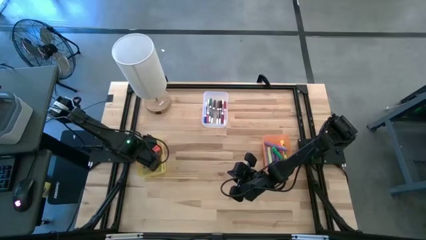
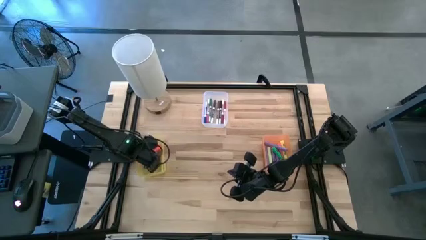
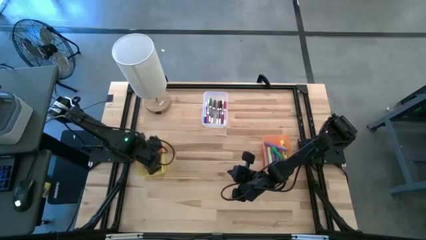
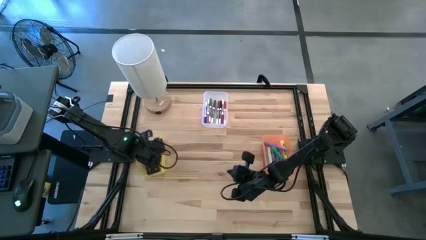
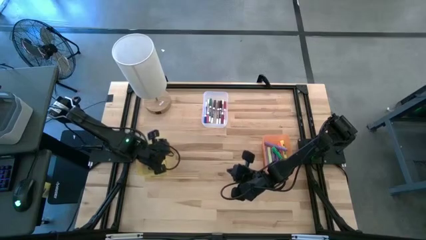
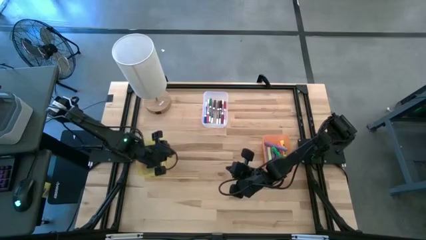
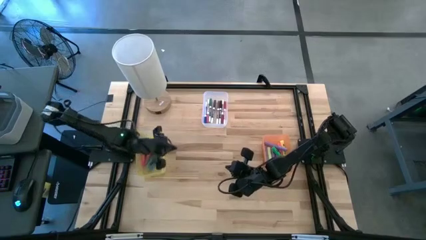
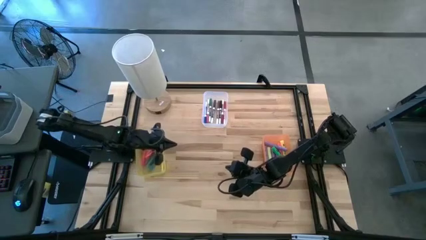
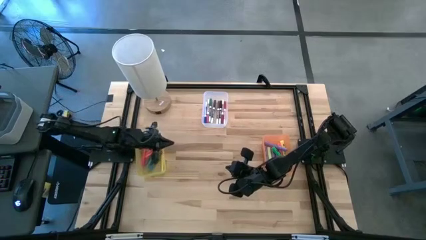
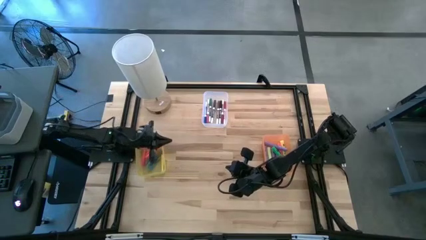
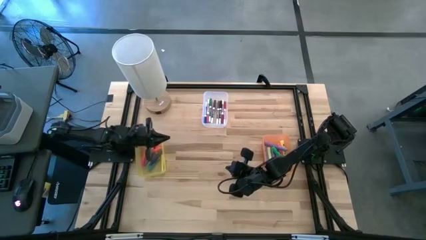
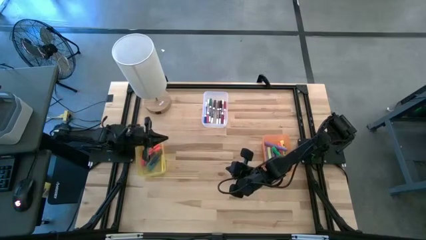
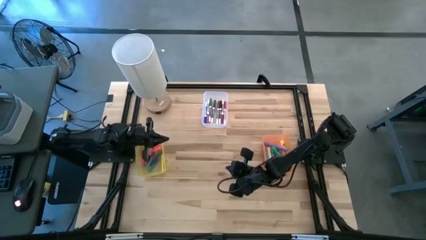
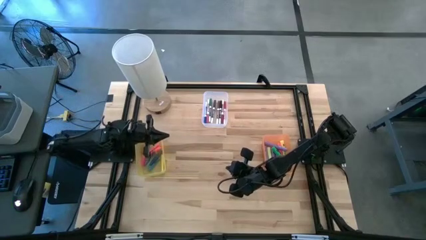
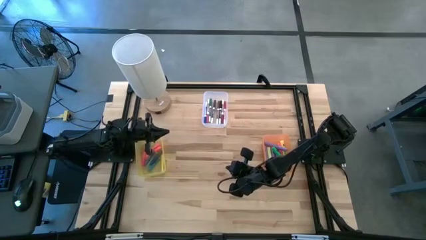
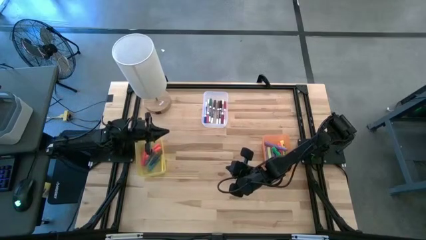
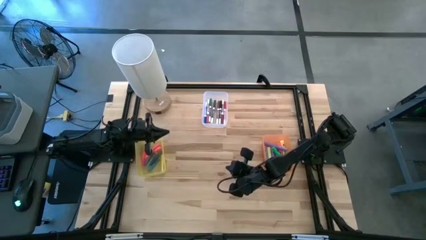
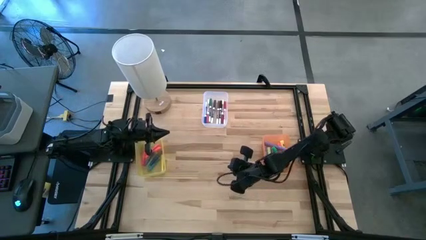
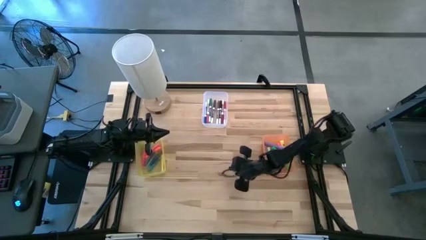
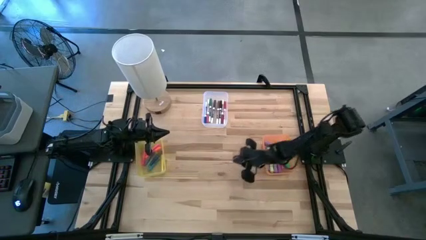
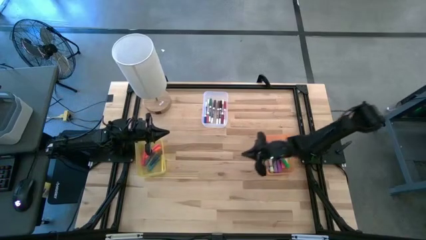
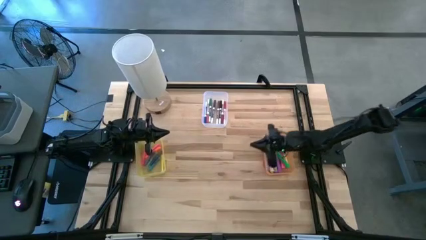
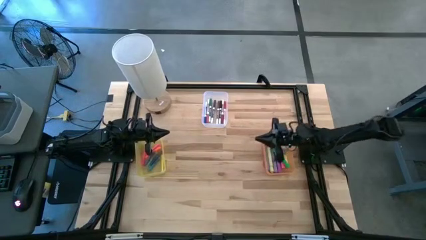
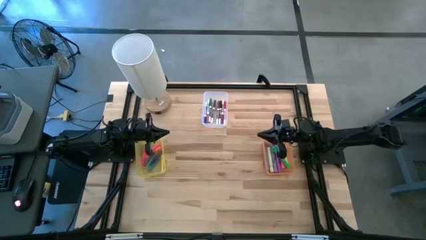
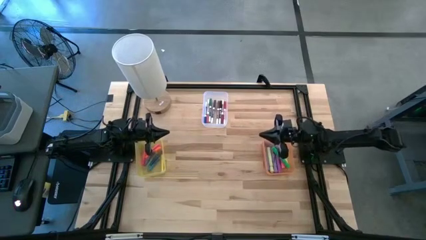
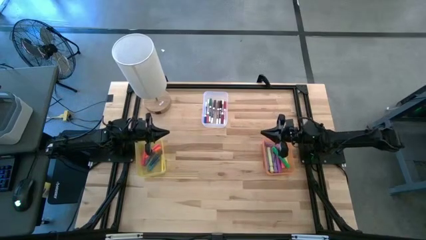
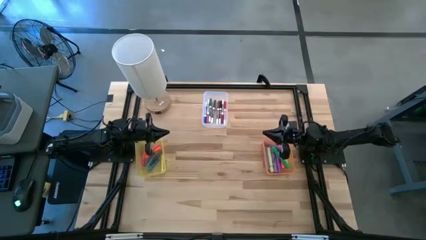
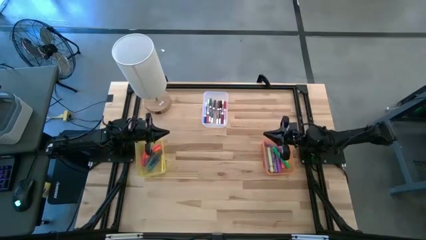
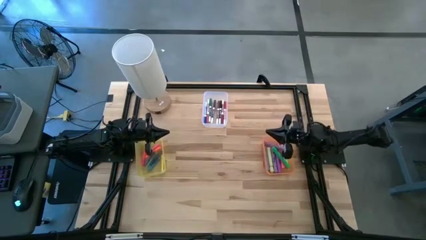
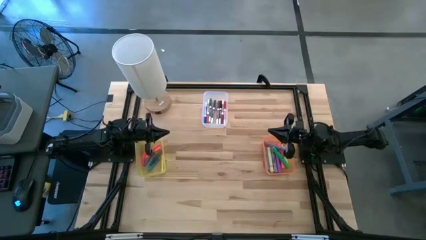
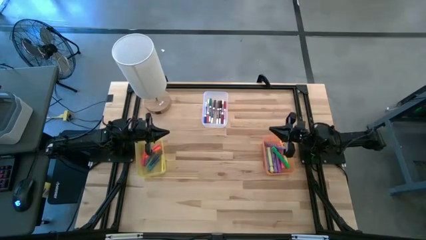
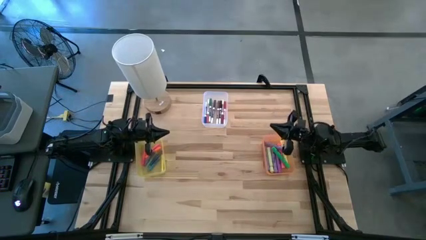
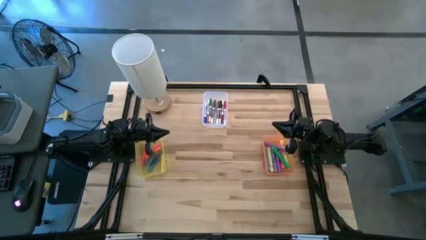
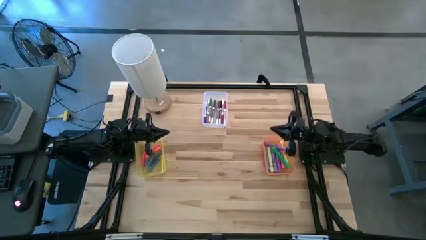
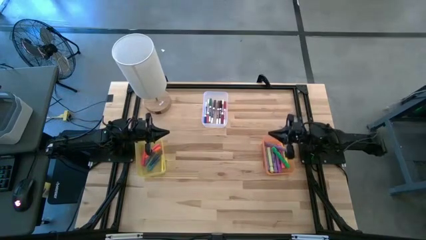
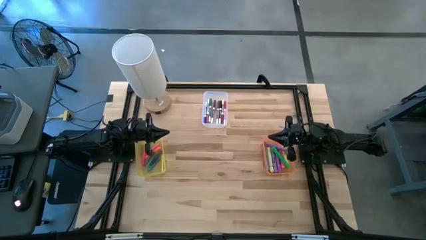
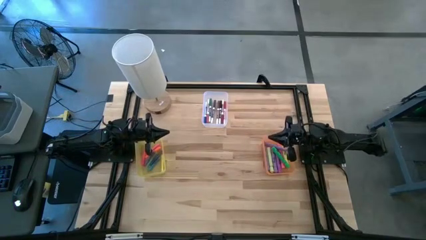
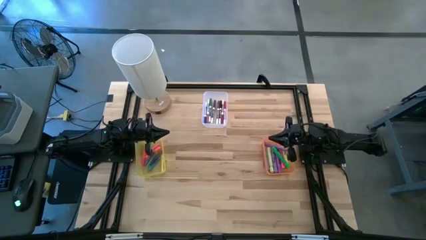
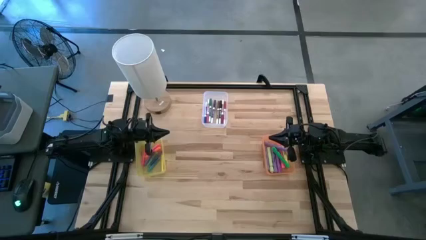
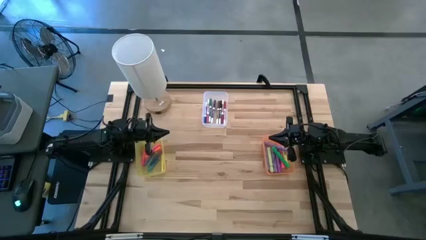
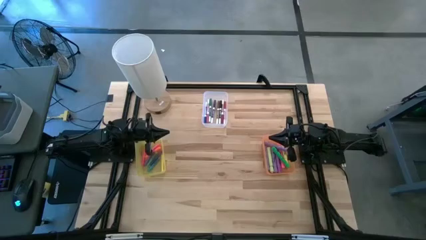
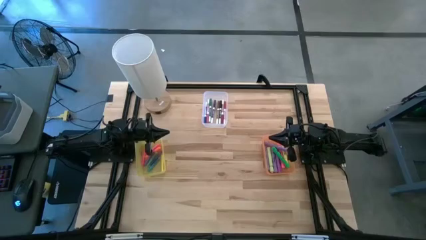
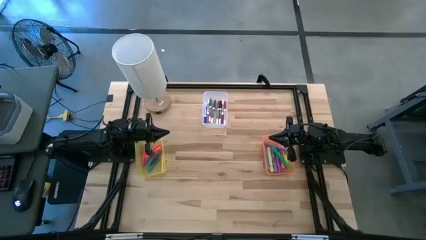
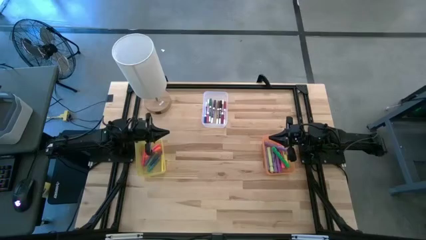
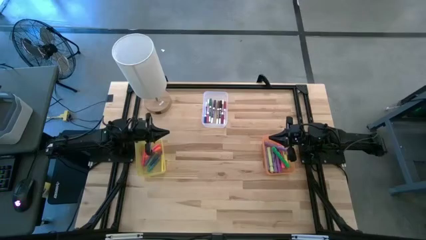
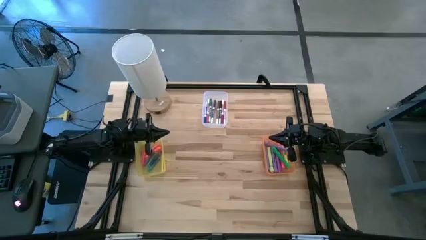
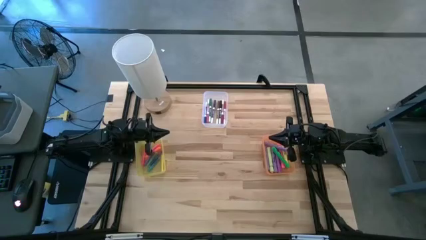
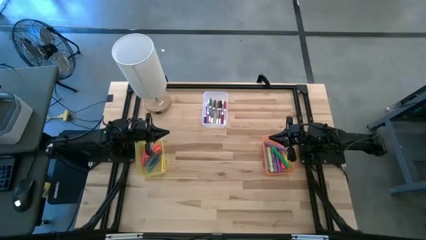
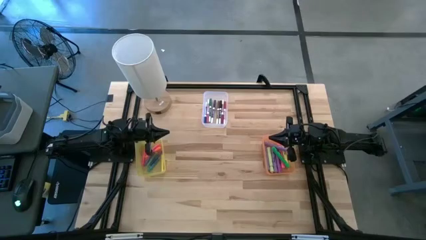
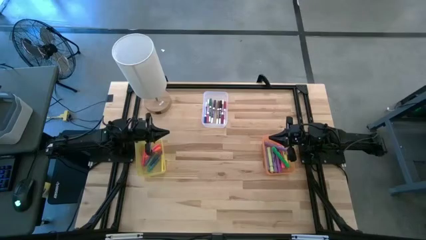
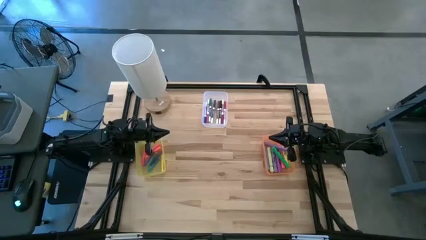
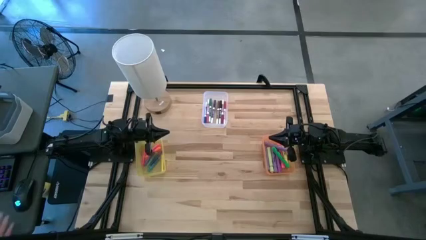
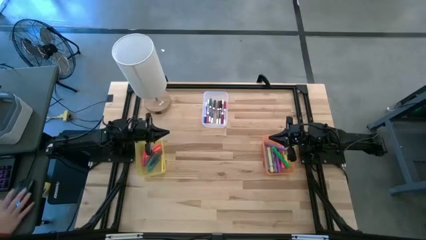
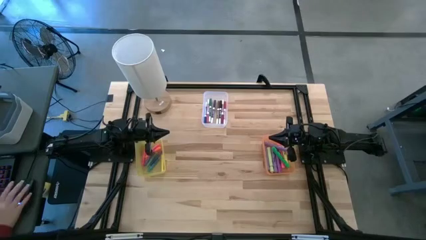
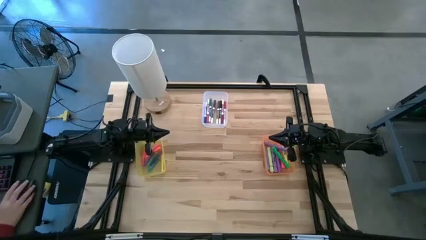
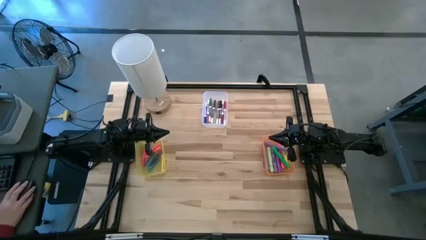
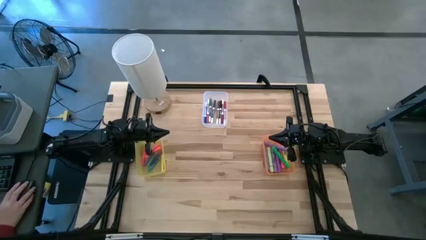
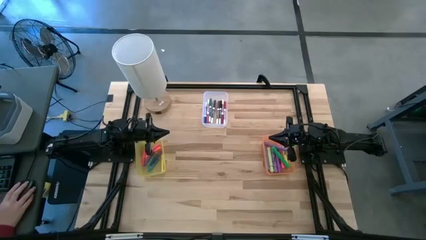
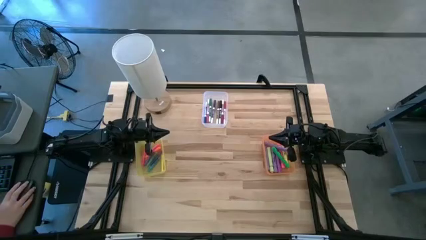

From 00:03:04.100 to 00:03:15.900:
Task: Pick & Place Markers
Return to Home Position

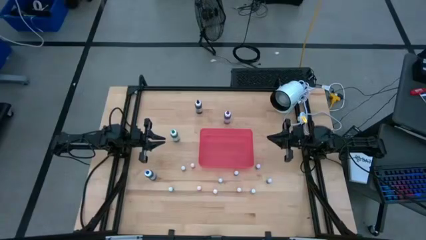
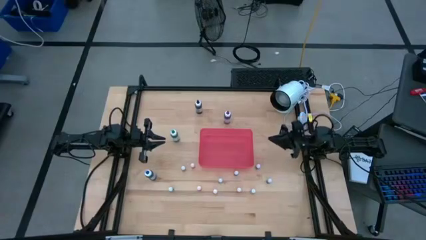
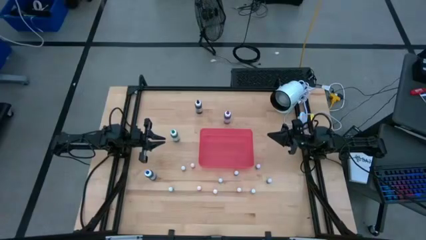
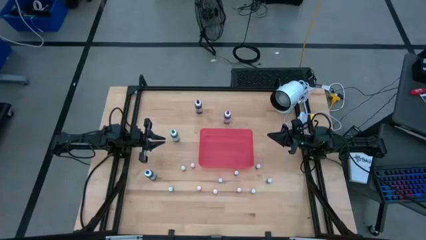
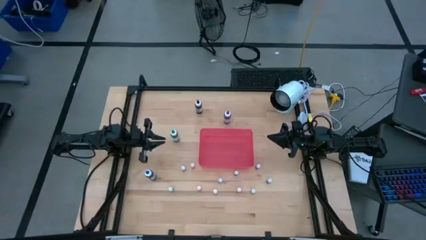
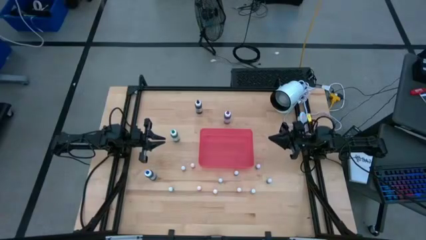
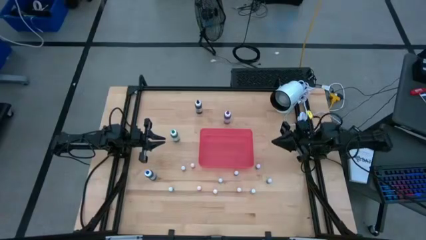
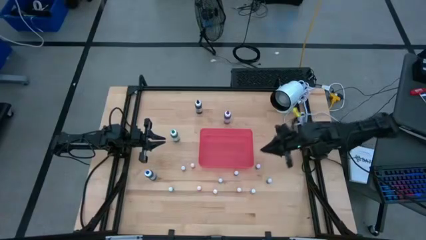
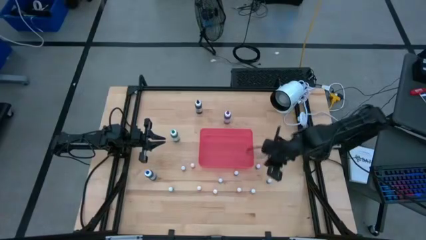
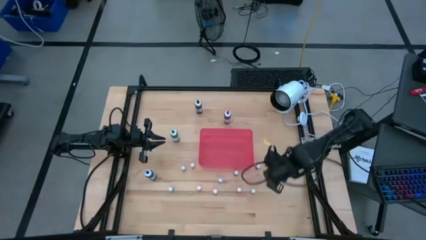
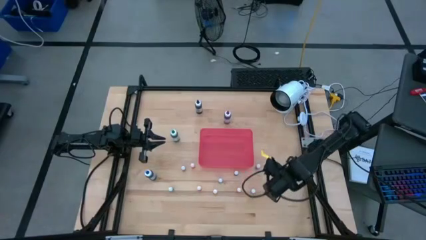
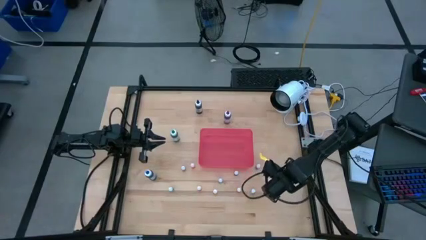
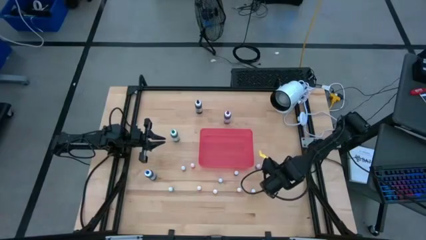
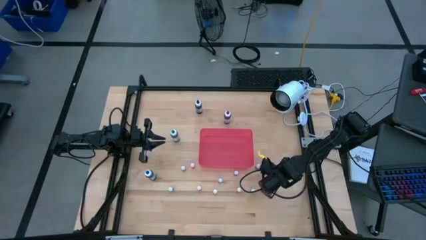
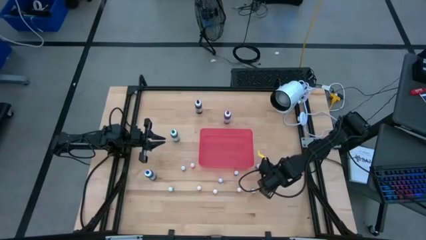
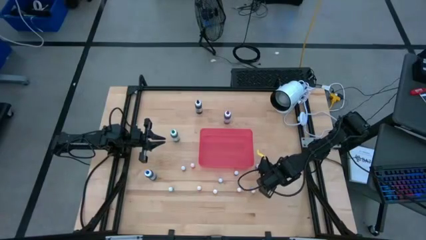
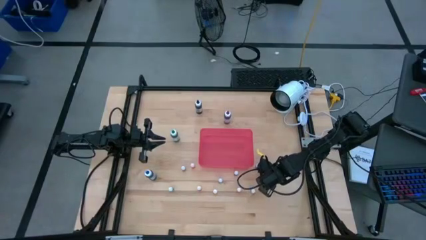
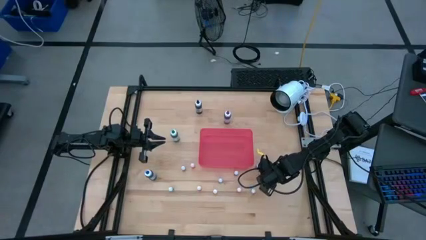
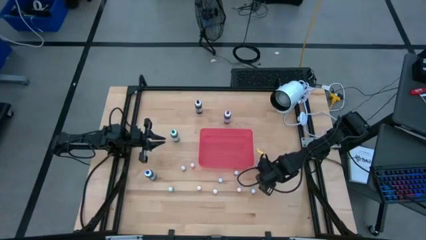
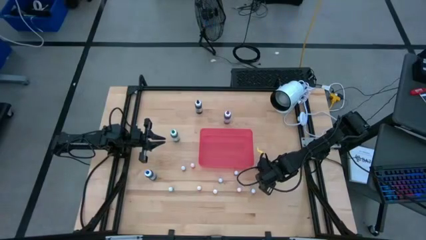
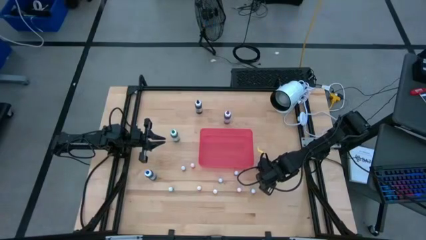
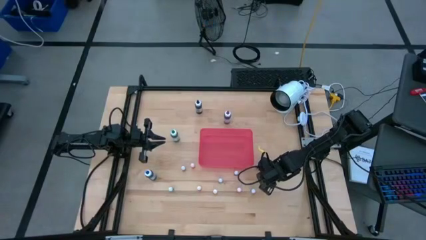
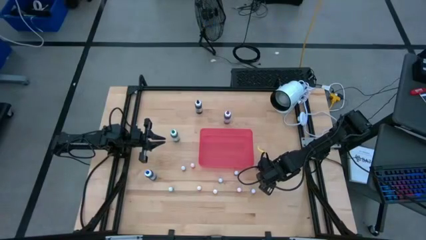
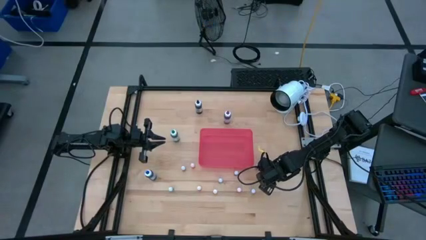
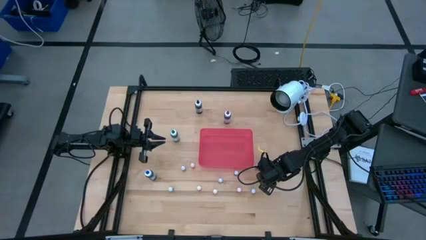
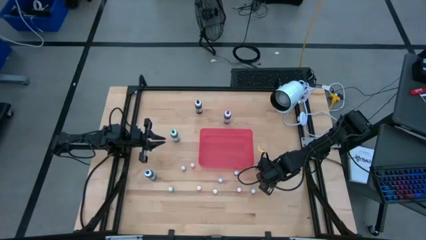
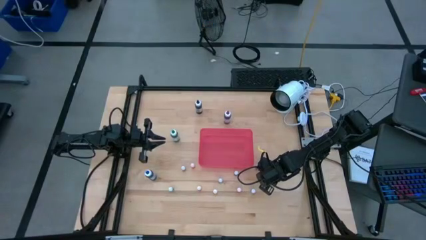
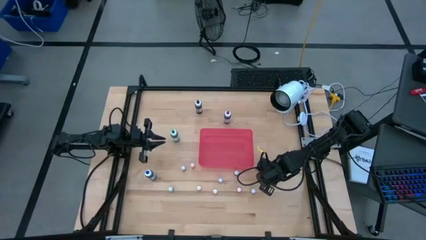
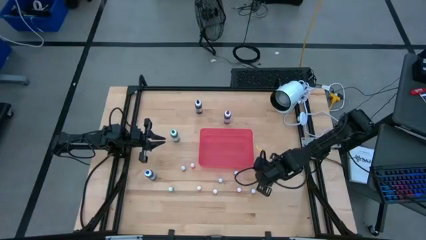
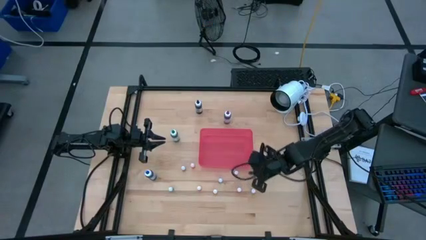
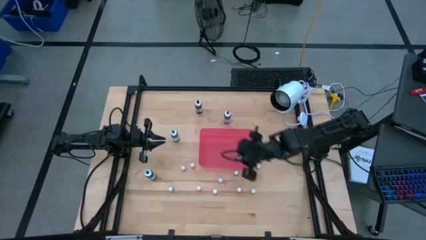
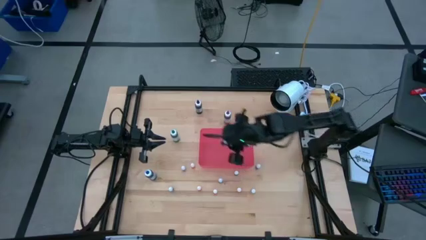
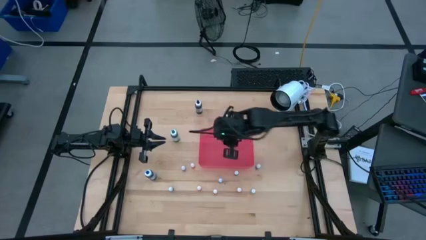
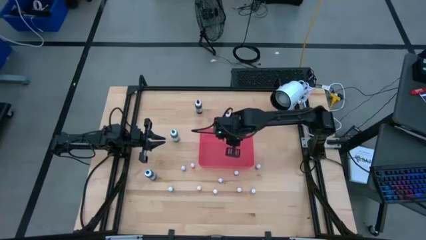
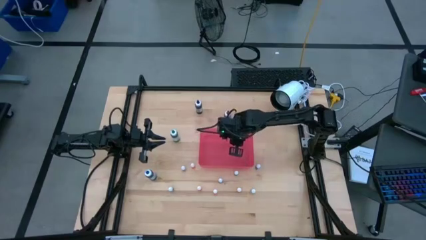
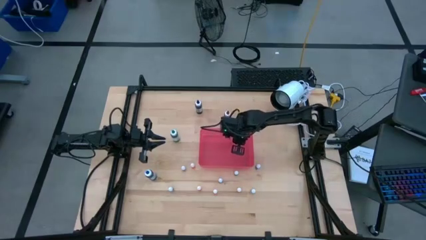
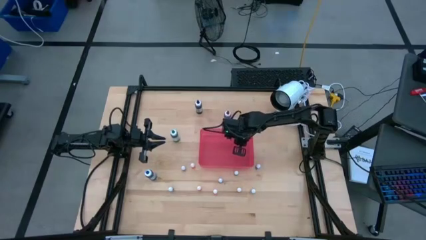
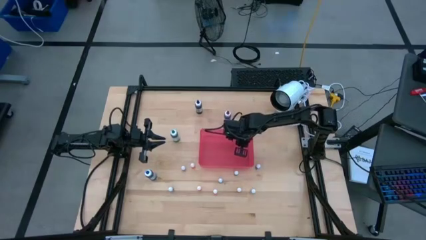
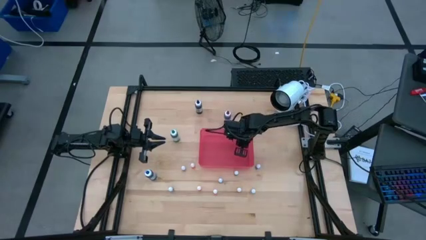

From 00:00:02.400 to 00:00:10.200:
Task: Pick & Place food coloring
Put the small black food coloring bottle into the red bin
